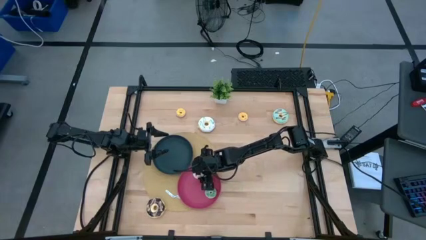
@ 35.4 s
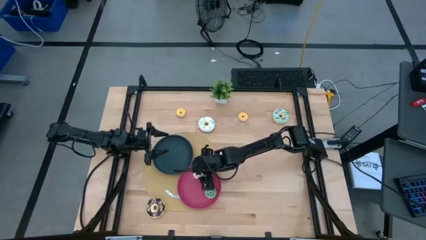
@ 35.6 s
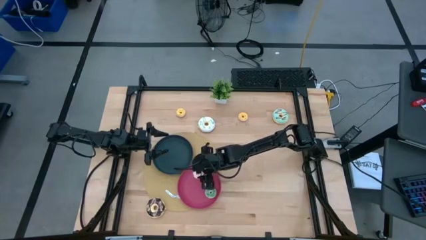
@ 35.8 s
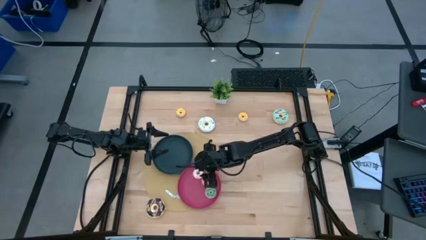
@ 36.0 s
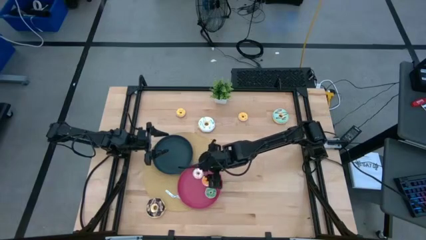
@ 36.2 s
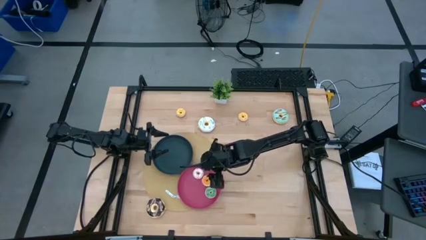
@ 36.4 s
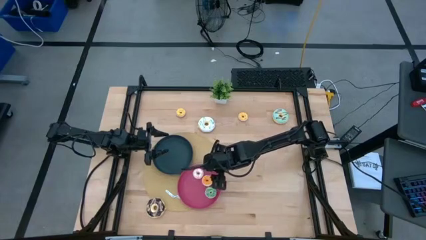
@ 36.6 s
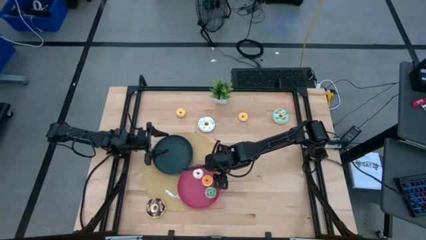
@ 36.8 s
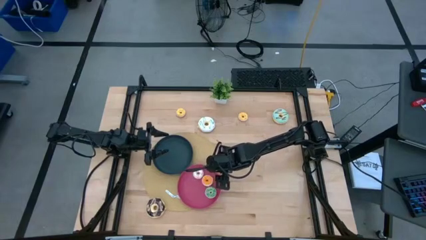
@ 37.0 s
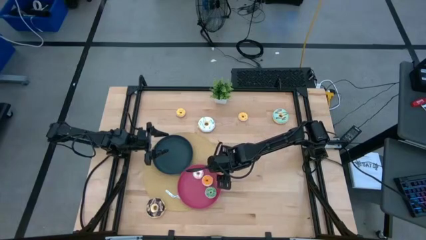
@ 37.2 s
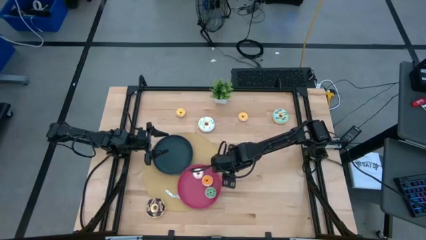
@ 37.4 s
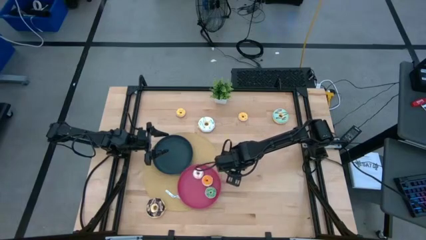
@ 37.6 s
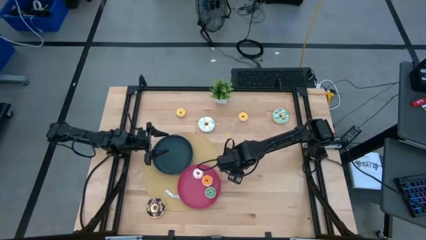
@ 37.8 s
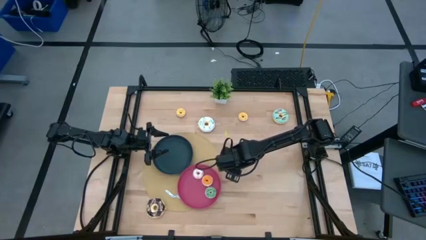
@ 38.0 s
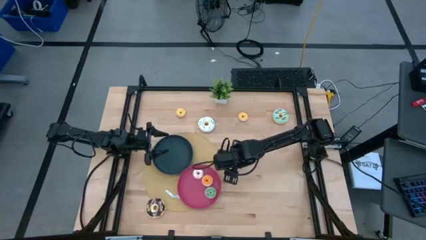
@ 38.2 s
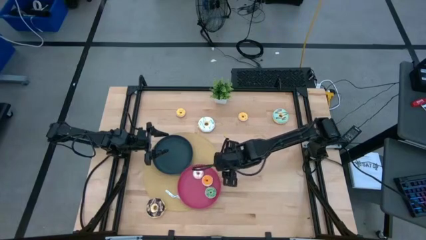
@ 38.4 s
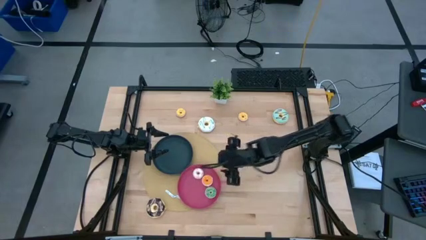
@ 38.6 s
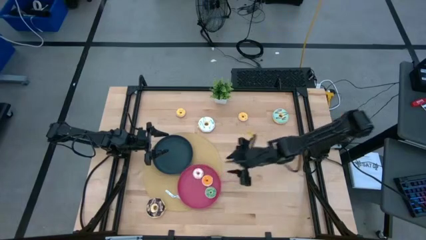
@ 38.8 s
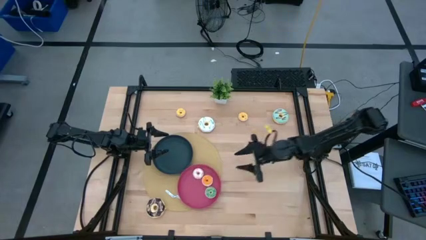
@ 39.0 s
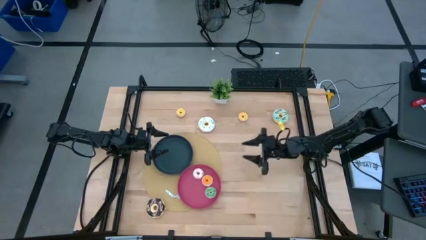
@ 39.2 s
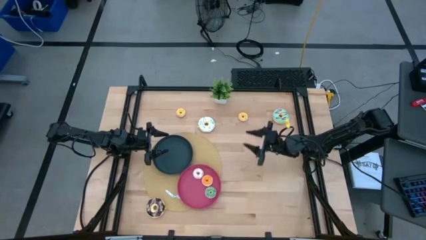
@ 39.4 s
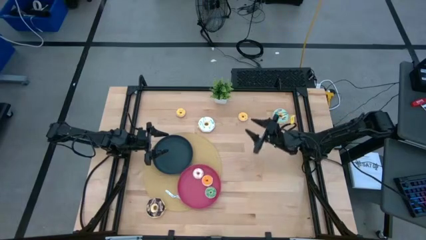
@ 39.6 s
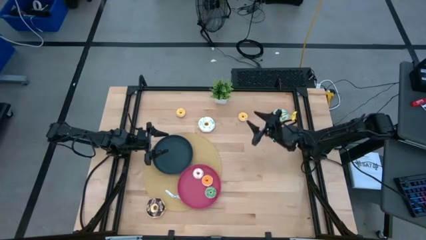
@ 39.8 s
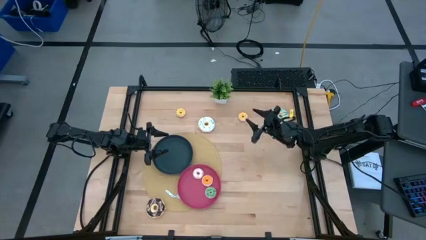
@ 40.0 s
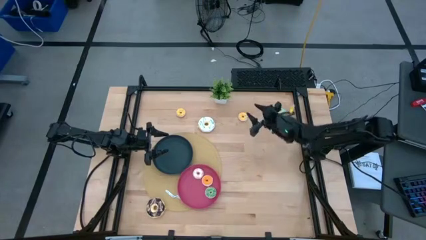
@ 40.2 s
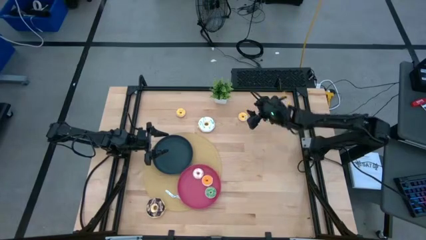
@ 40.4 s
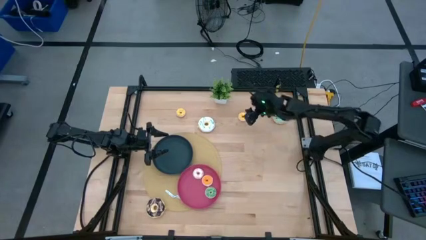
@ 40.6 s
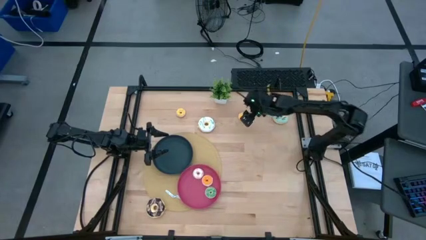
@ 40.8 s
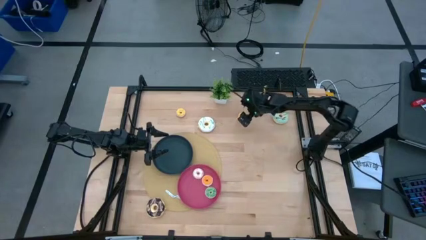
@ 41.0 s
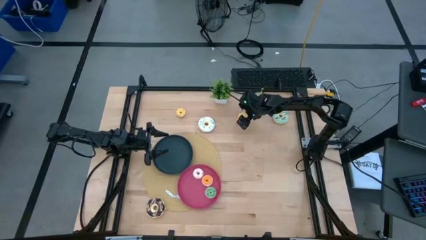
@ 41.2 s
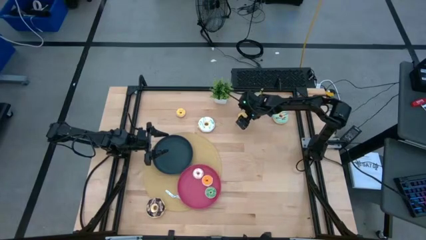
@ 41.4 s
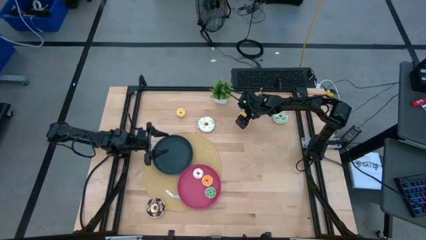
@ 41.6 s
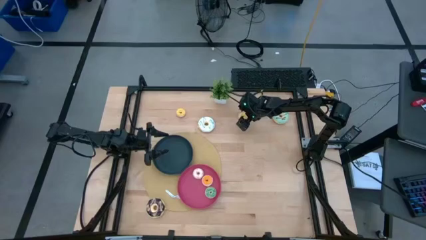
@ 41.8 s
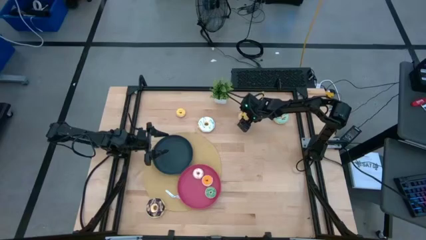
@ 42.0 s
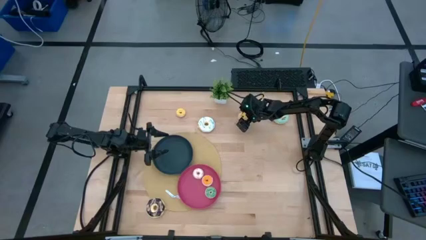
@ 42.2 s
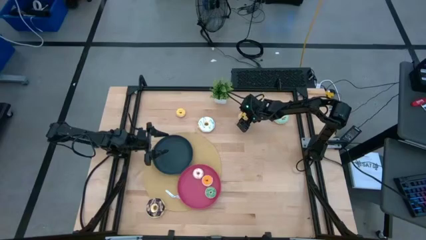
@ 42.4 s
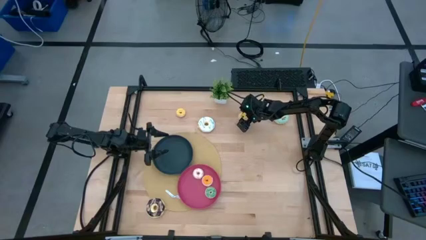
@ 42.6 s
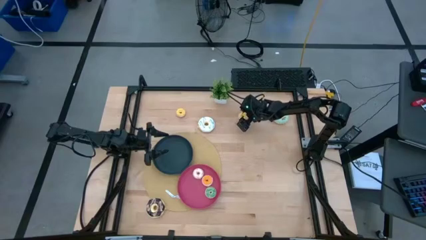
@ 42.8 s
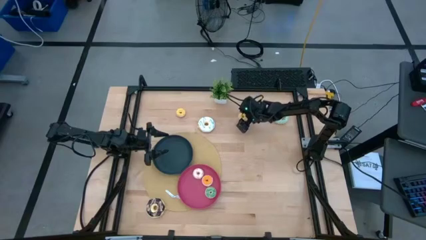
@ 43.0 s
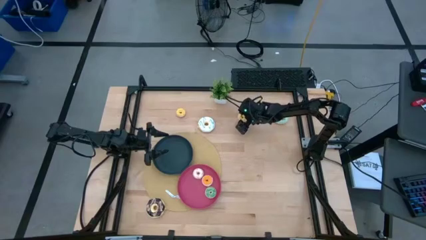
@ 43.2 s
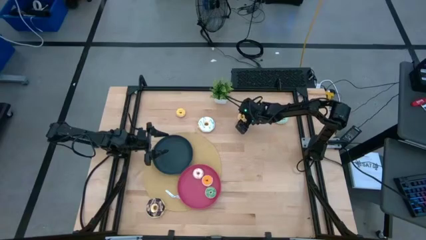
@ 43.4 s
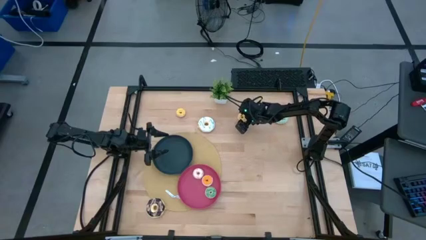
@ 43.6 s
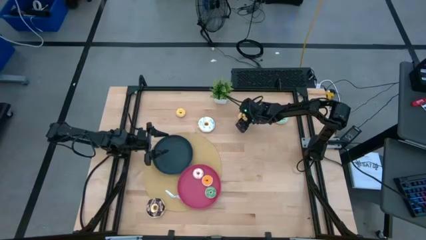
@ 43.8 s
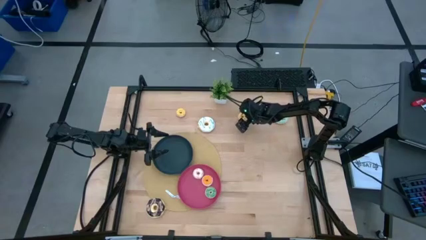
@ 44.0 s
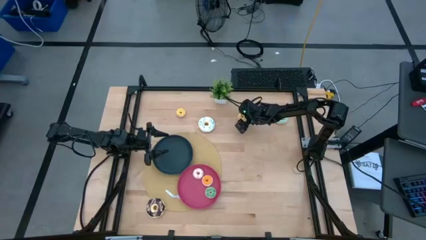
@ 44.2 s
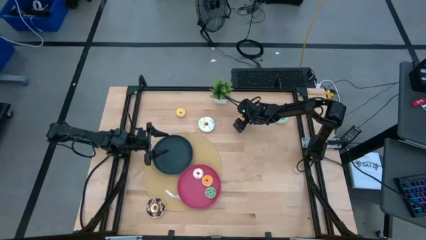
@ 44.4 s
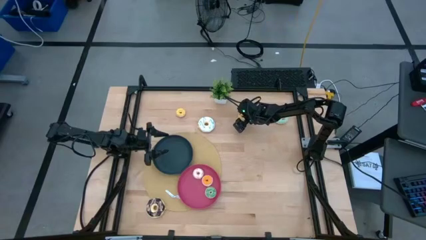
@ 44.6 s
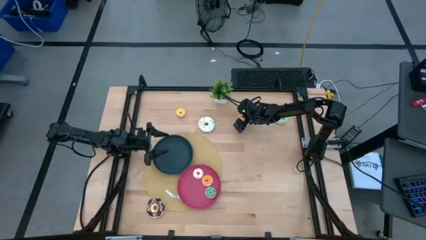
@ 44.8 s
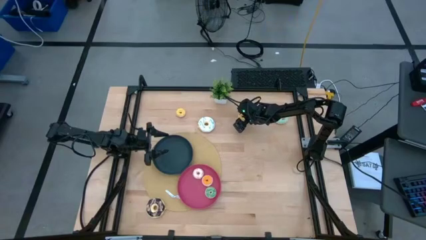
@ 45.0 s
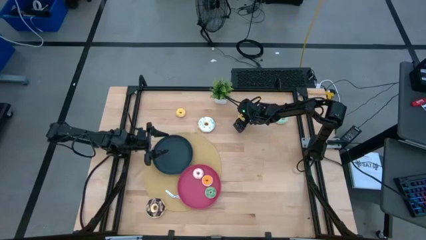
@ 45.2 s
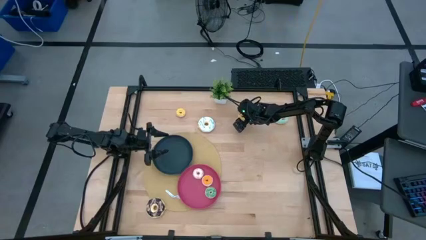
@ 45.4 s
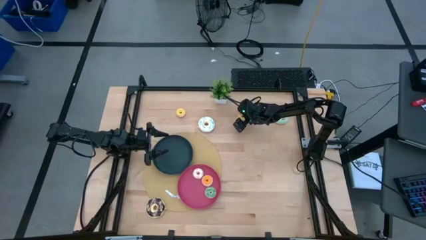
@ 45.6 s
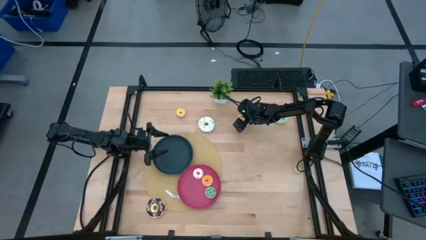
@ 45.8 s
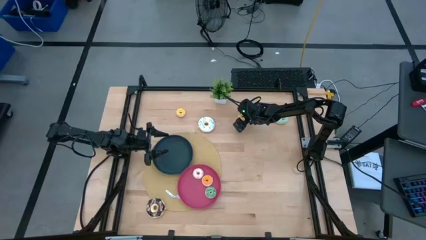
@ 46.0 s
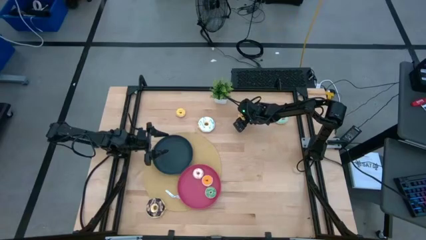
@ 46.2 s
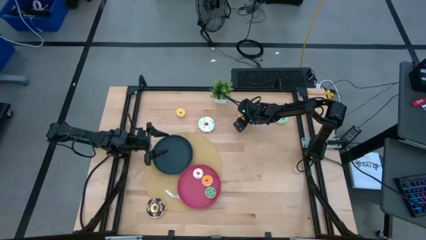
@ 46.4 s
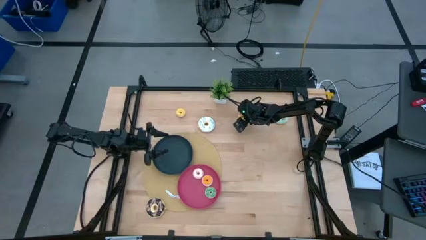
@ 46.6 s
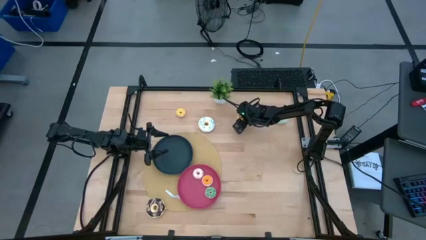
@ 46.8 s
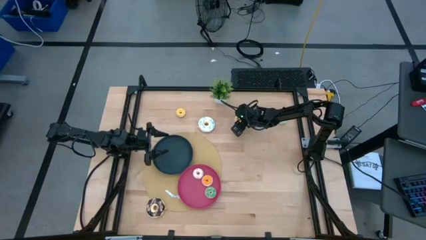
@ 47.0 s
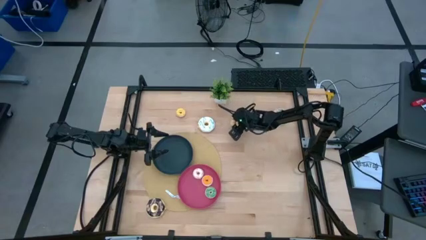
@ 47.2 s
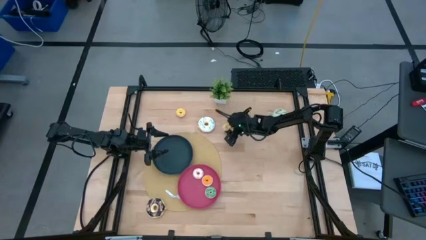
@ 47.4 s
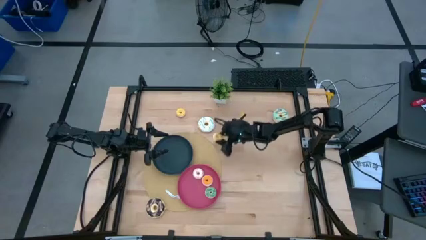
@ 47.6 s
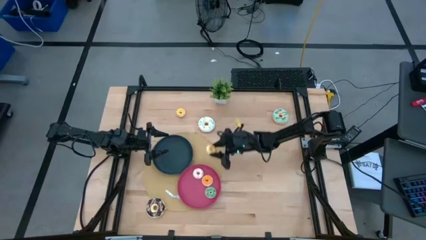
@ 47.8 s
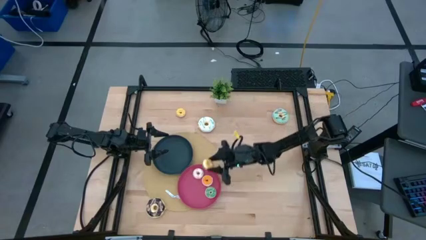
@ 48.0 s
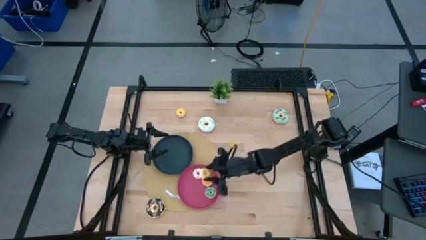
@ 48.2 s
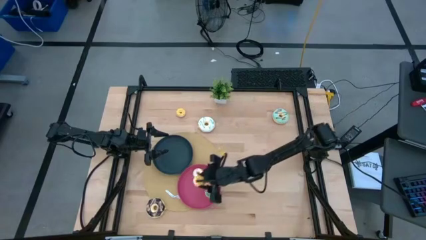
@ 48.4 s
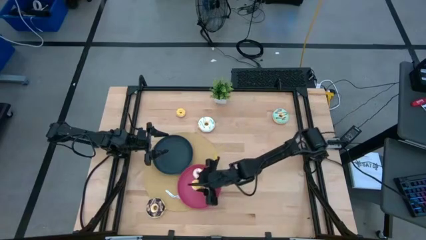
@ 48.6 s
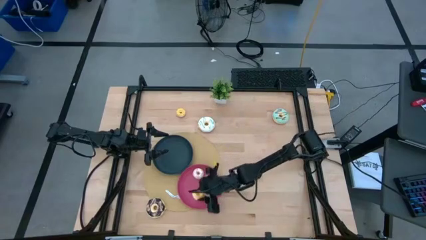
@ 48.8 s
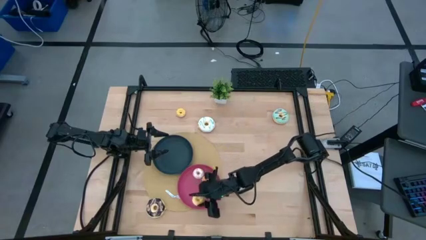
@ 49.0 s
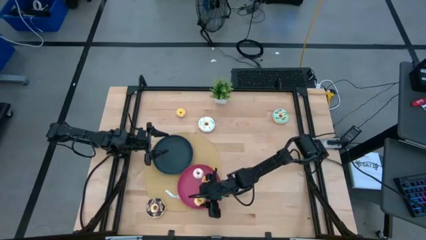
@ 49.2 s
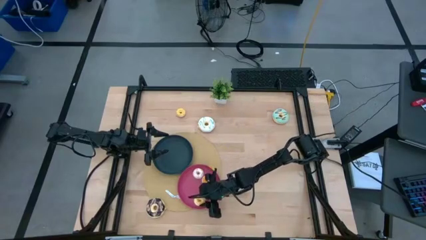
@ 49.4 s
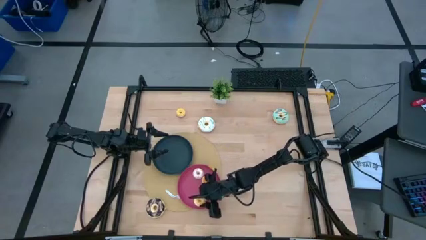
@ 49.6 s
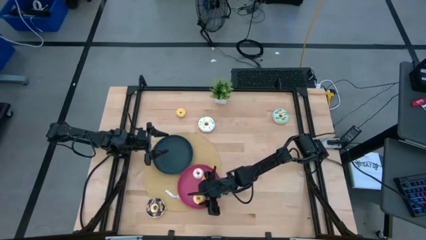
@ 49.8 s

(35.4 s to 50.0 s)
Task: Pick & Place donuts
Put the right small yellow donut into the pink plate
